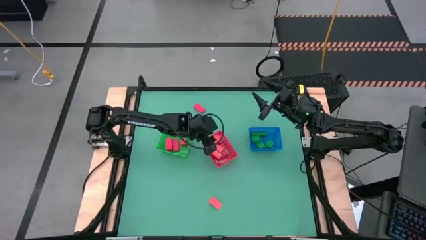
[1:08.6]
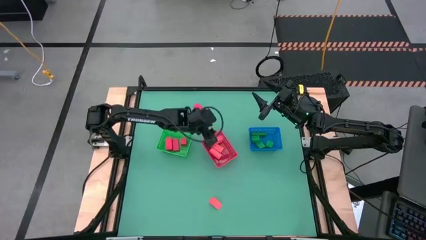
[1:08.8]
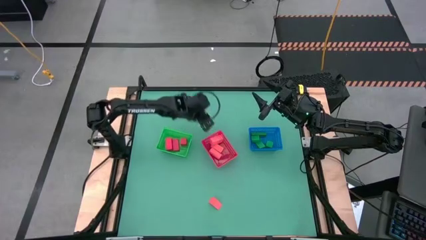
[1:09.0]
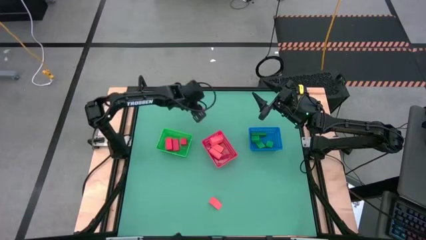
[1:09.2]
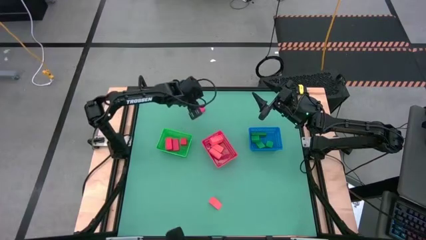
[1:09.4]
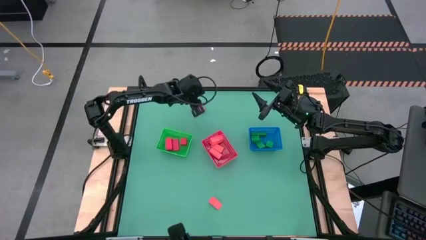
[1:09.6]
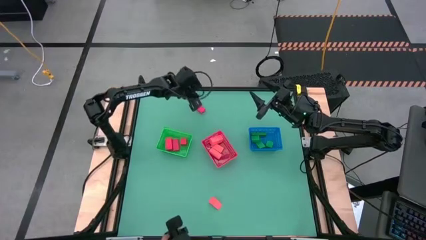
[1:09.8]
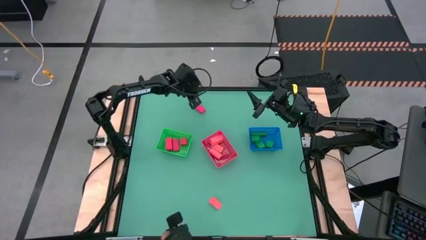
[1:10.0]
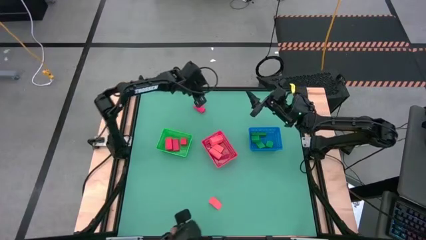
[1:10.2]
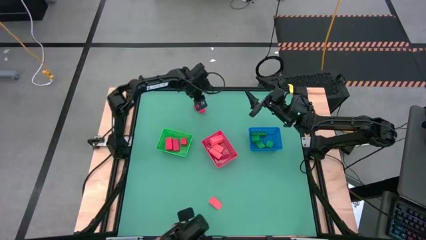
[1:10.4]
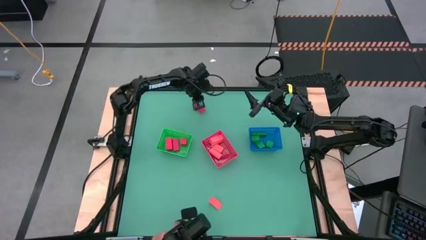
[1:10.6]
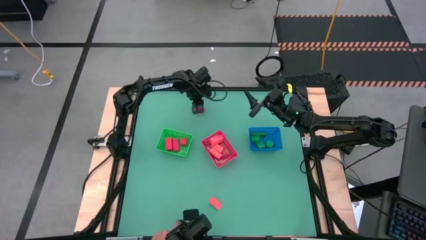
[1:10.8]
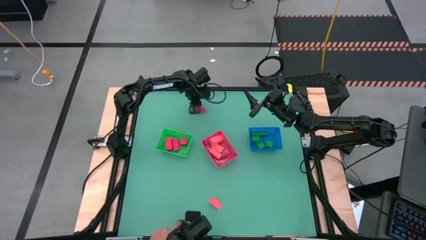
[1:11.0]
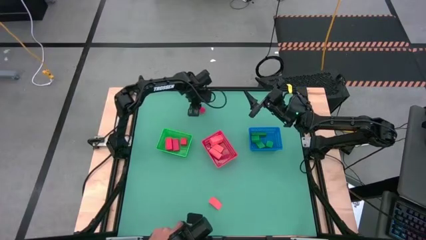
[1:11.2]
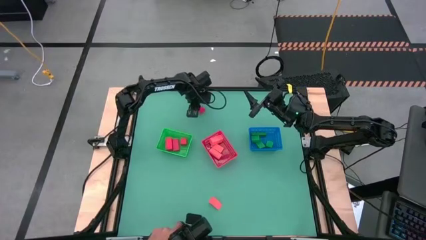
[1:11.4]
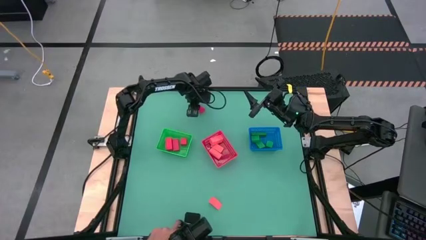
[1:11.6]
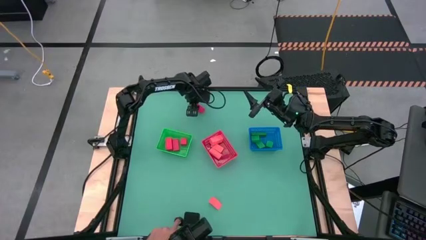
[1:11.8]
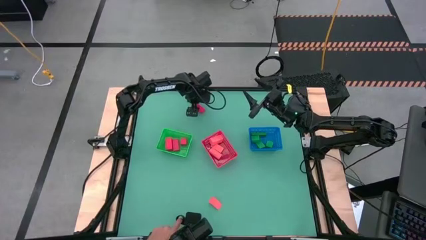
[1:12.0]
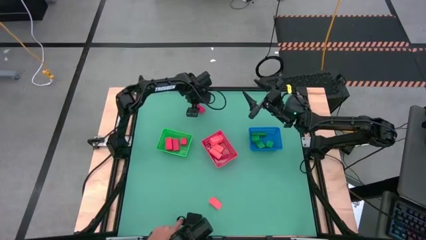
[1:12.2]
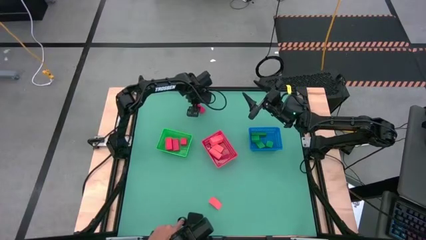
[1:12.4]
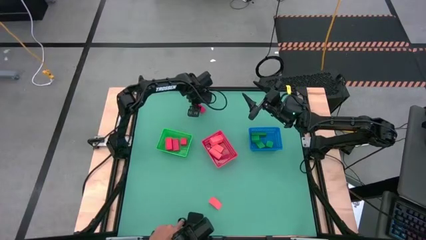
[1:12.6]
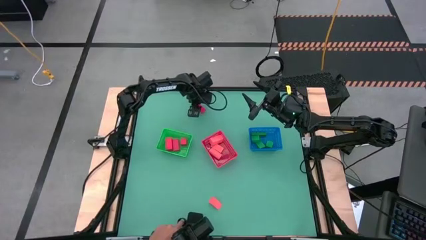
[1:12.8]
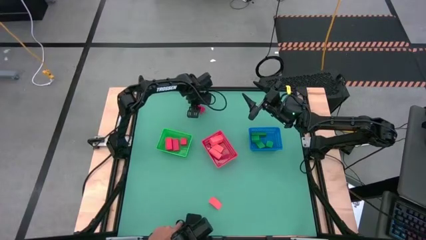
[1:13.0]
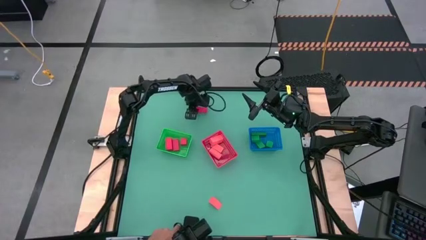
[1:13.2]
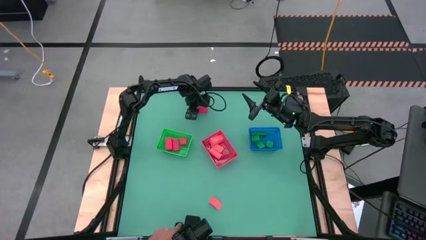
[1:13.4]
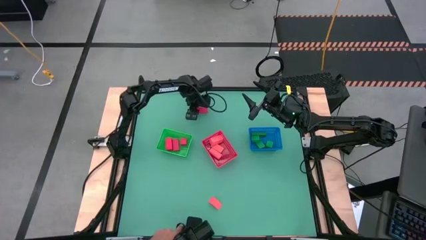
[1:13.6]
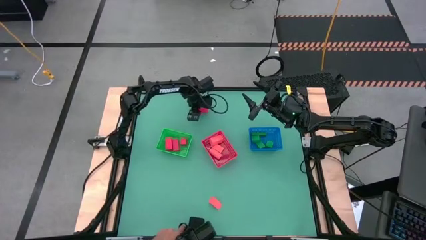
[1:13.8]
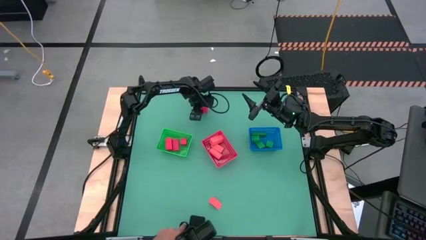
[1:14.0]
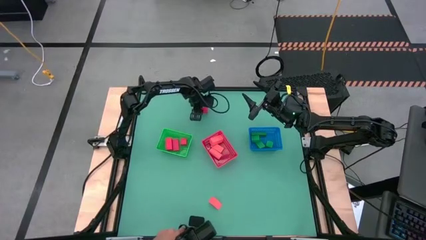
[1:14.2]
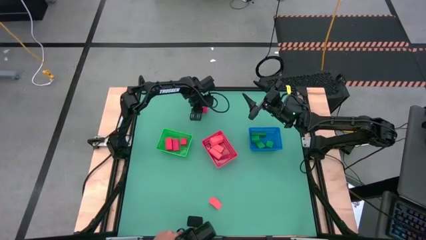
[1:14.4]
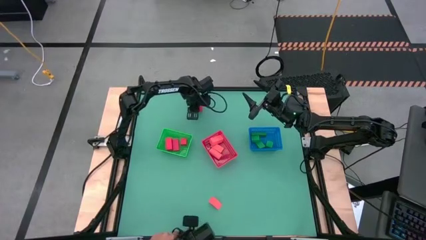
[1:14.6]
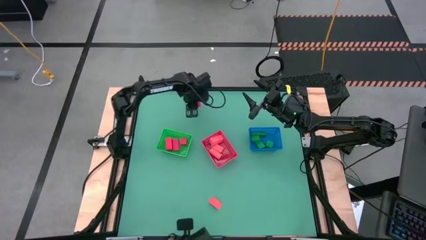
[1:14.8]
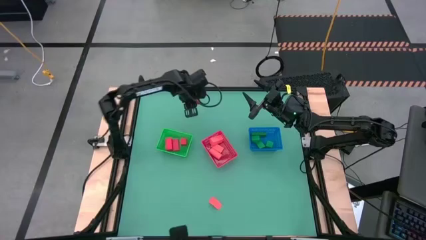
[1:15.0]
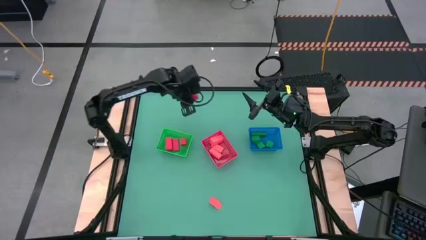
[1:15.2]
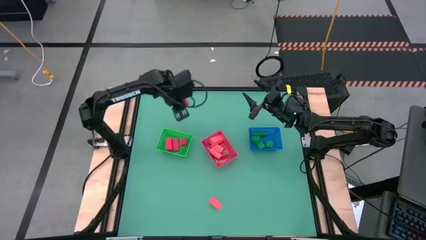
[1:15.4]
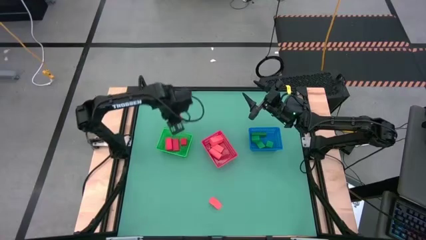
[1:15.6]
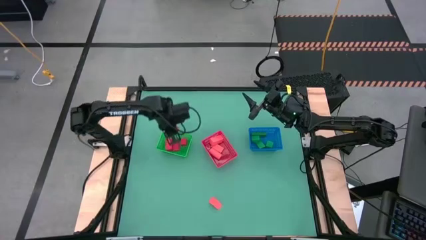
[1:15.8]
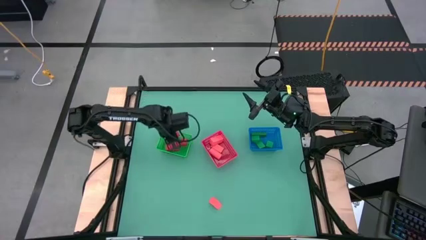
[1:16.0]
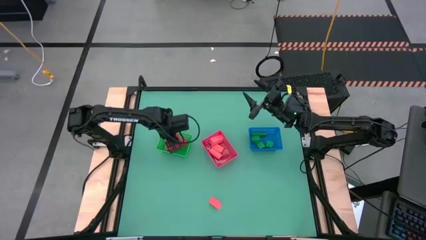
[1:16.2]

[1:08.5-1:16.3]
Task: Sort & place blocks by color
Put the red block into the green bin

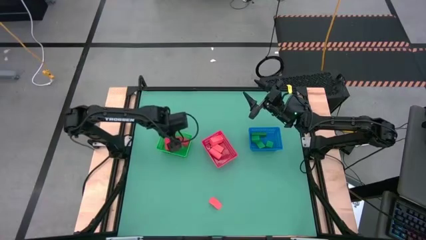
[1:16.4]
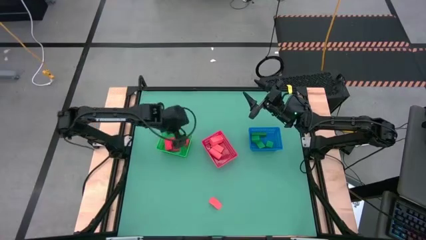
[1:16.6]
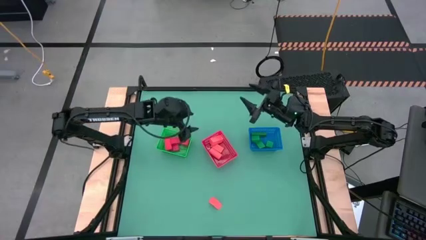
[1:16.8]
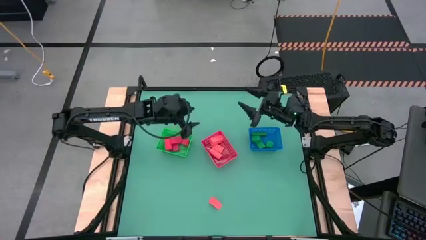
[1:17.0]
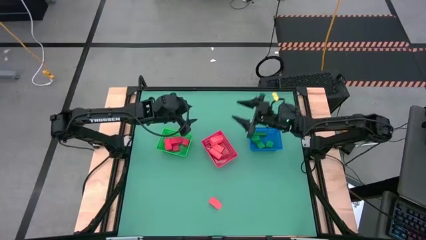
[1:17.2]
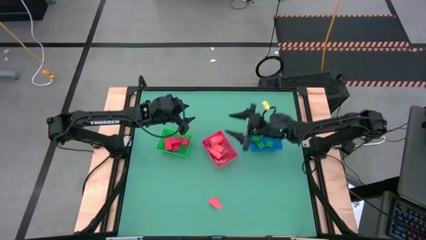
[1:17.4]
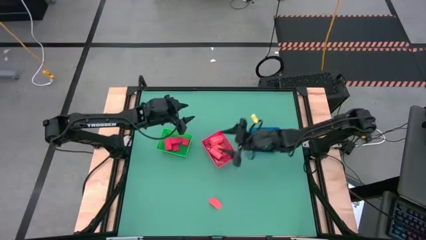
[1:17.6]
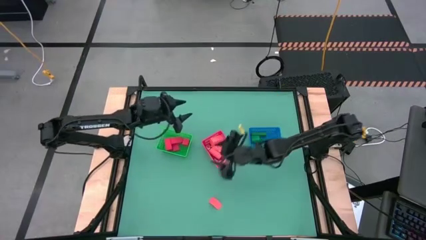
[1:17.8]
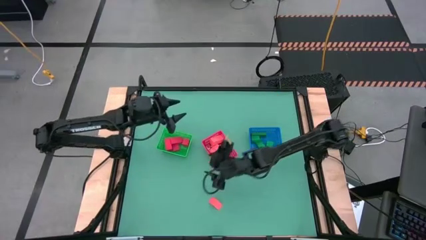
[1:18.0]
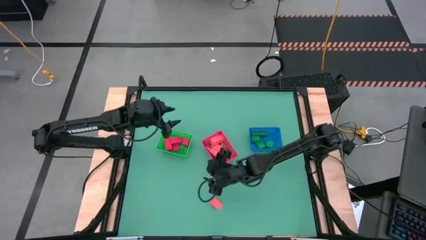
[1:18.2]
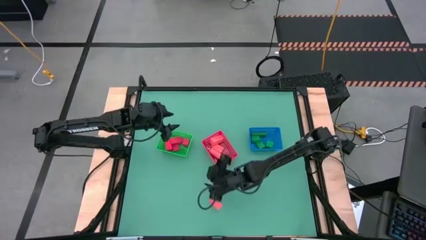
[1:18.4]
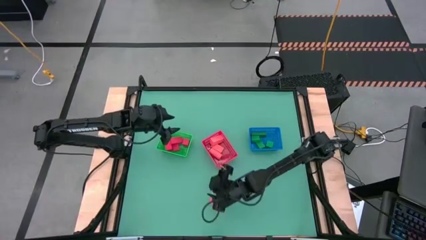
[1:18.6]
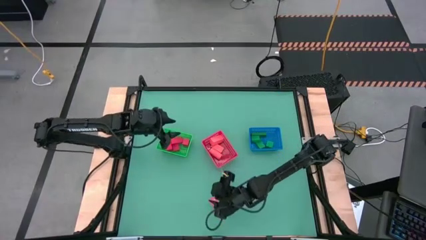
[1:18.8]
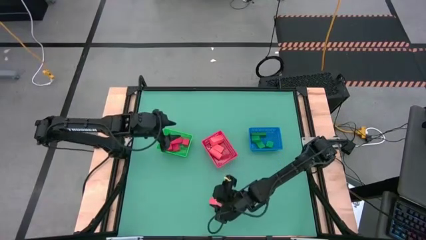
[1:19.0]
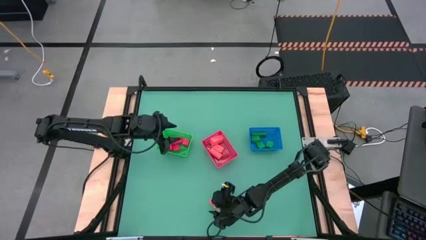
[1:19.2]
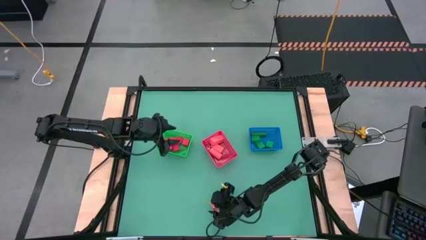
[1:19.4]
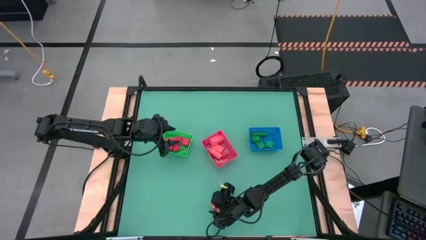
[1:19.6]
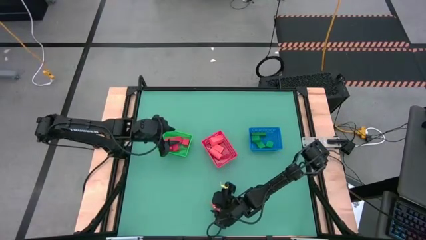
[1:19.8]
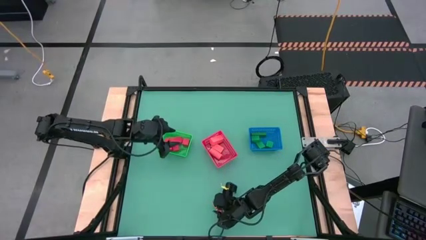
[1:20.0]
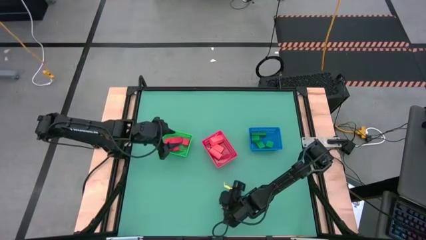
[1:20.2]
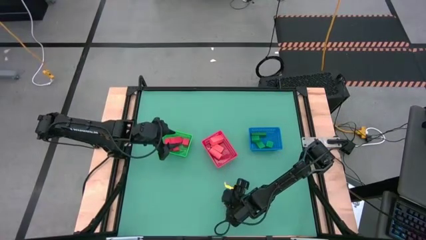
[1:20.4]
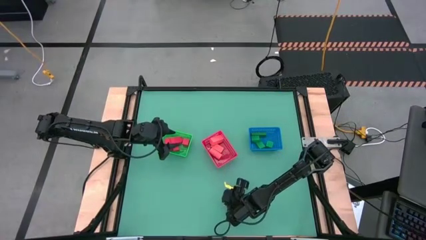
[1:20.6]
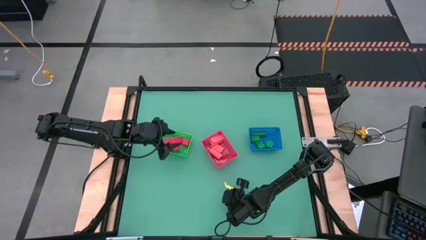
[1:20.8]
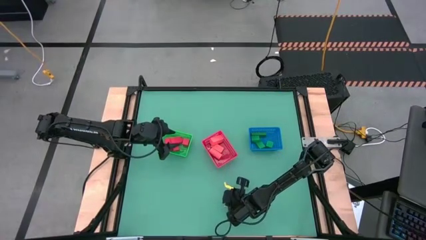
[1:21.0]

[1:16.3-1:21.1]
Put the pink block into the red bin

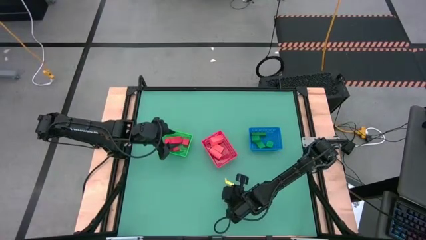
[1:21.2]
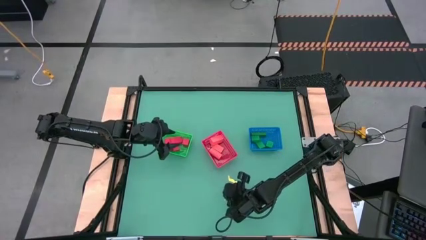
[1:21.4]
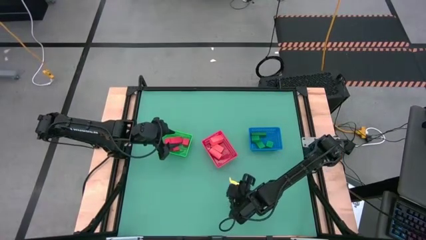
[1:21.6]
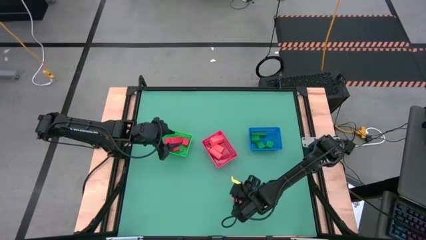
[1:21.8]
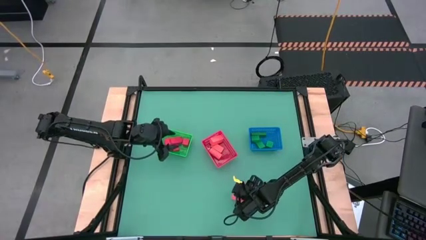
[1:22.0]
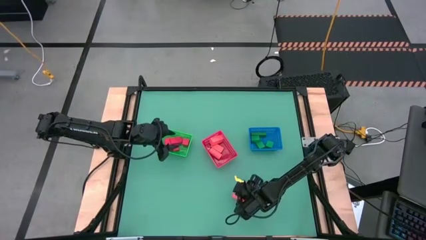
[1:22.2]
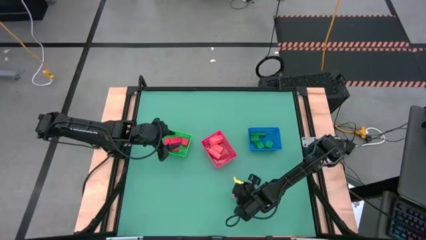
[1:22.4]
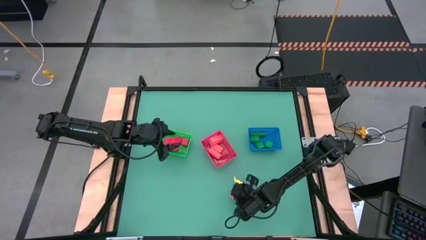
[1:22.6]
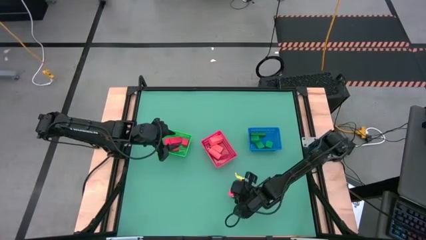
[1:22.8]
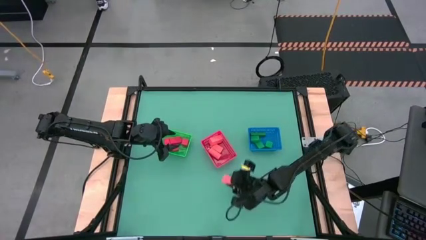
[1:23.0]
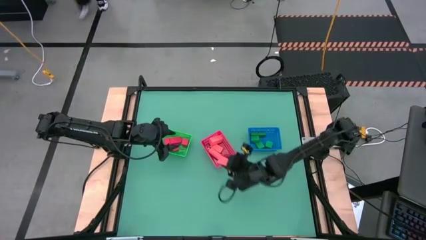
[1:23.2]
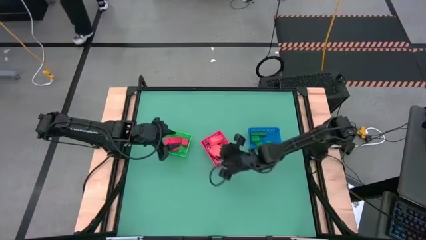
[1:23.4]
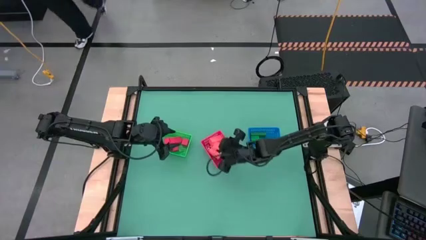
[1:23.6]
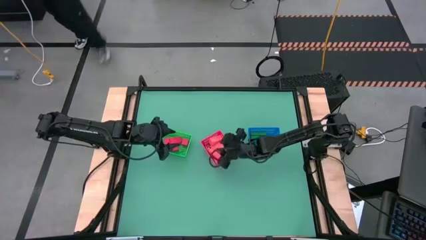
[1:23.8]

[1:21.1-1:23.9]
Put the pink block into the red bin
